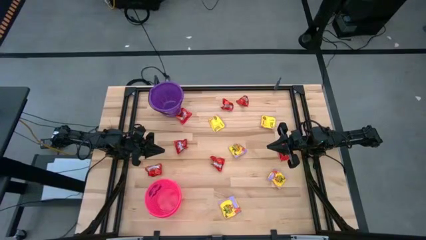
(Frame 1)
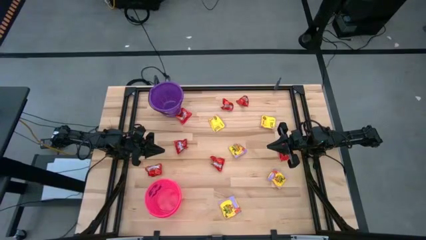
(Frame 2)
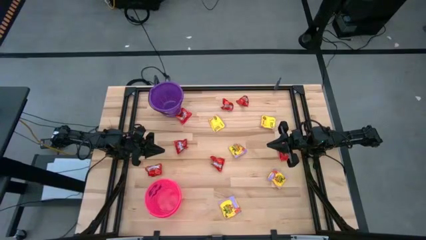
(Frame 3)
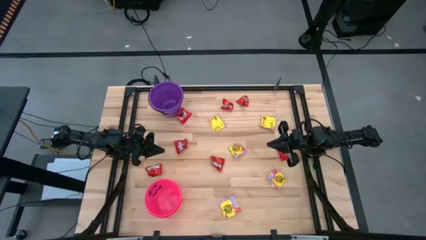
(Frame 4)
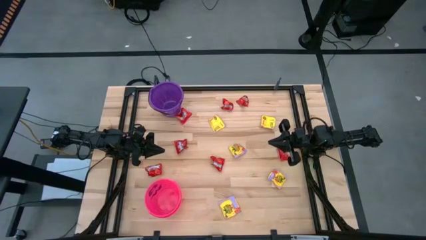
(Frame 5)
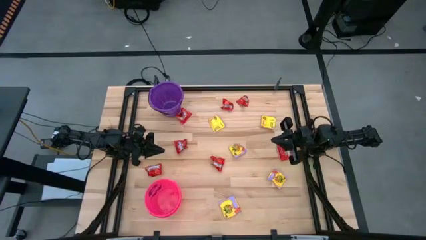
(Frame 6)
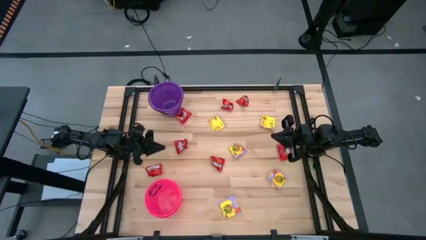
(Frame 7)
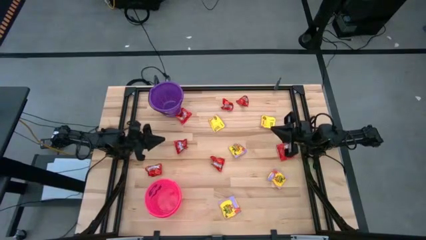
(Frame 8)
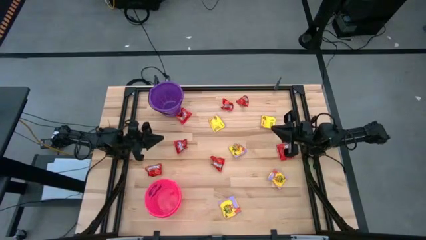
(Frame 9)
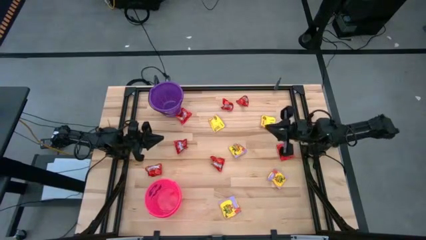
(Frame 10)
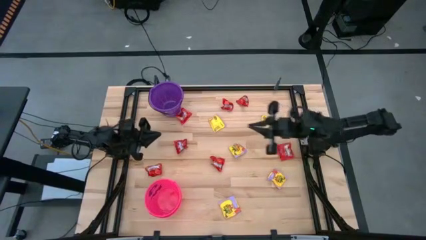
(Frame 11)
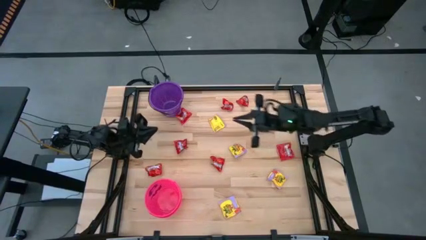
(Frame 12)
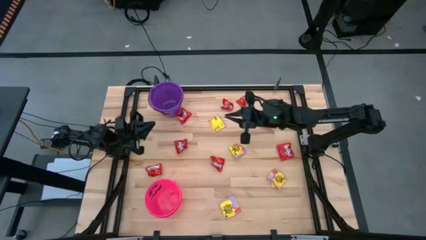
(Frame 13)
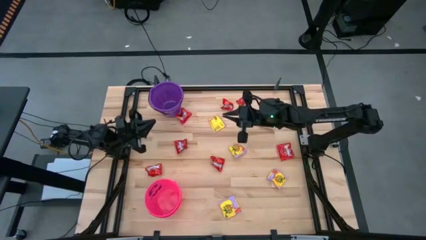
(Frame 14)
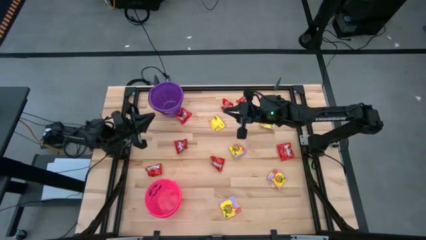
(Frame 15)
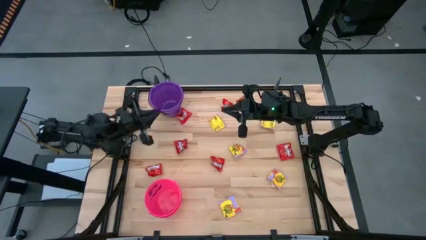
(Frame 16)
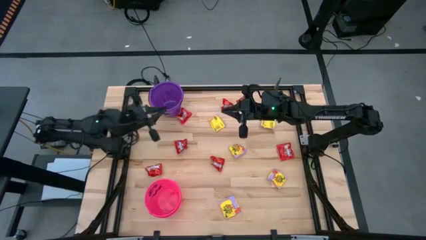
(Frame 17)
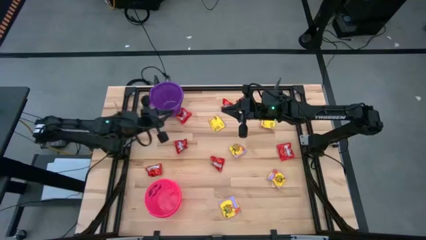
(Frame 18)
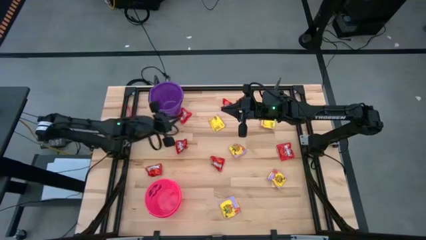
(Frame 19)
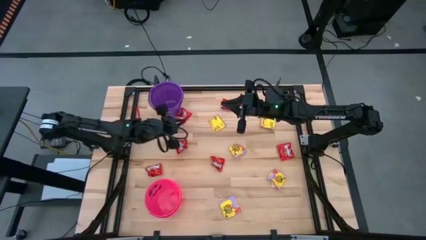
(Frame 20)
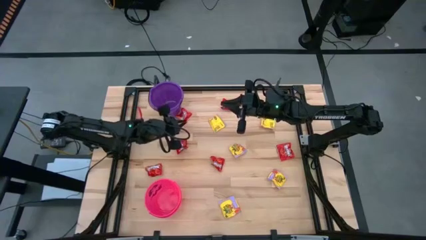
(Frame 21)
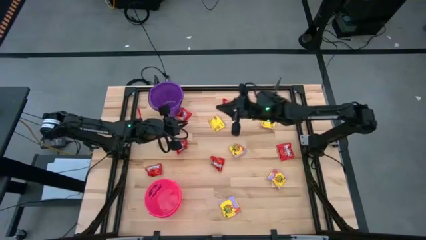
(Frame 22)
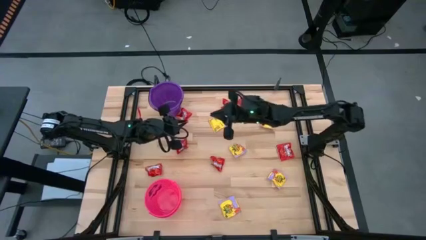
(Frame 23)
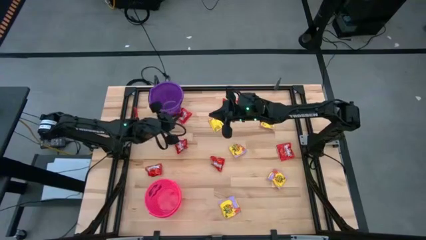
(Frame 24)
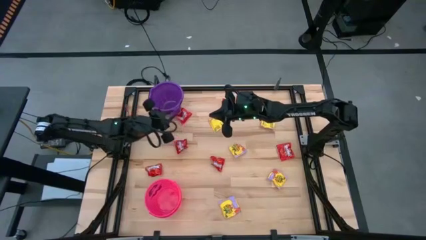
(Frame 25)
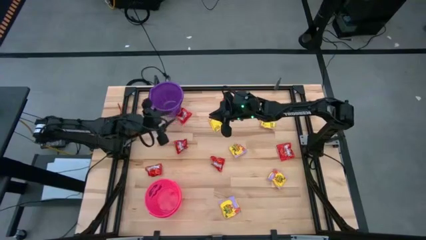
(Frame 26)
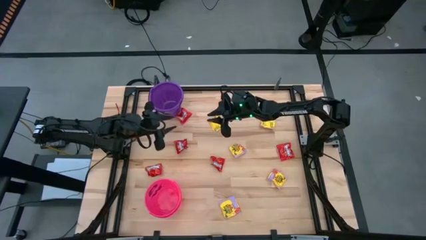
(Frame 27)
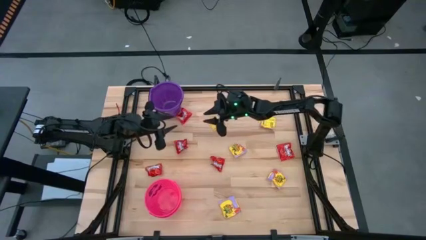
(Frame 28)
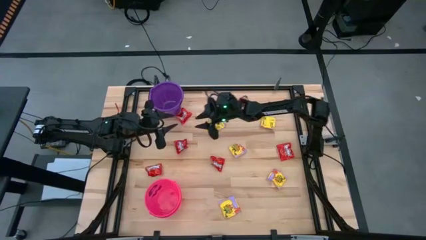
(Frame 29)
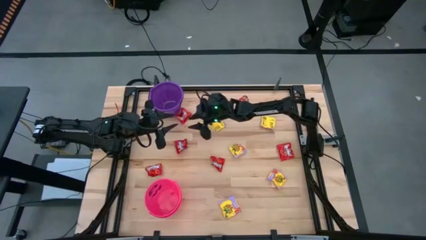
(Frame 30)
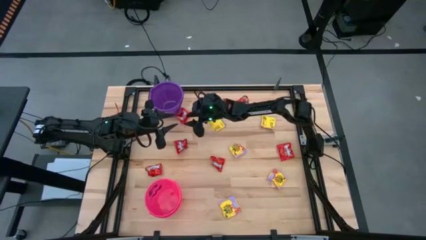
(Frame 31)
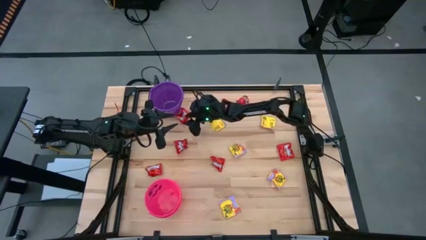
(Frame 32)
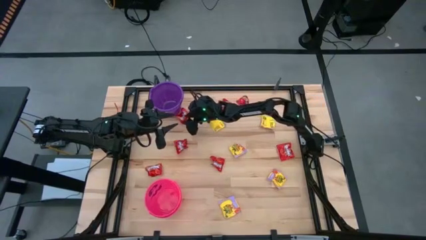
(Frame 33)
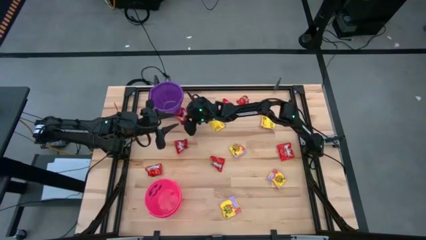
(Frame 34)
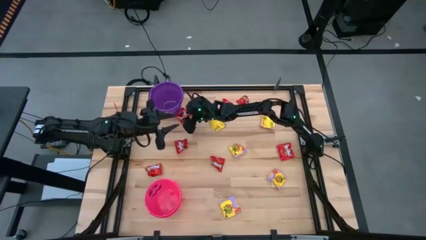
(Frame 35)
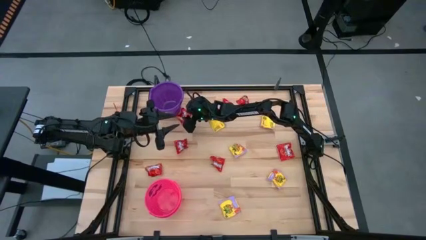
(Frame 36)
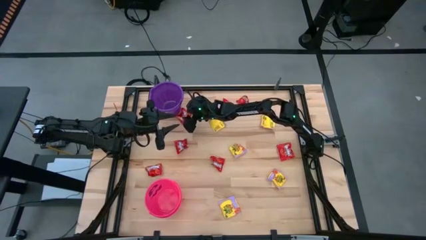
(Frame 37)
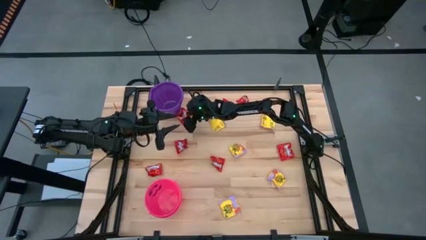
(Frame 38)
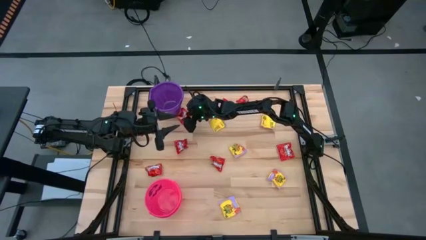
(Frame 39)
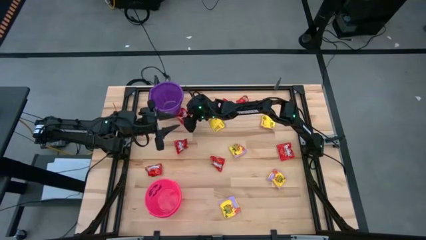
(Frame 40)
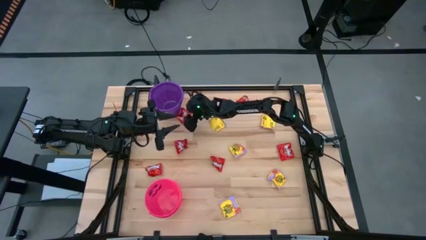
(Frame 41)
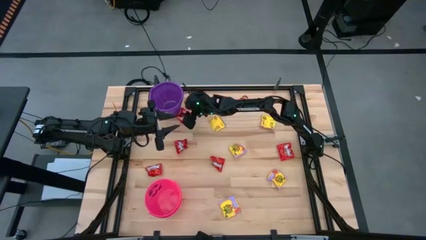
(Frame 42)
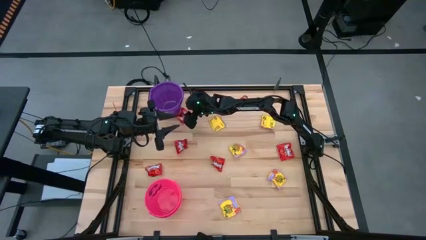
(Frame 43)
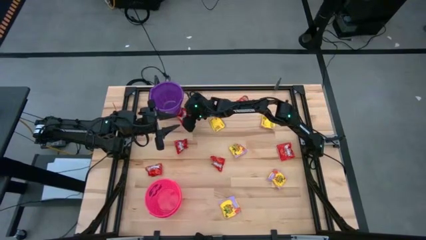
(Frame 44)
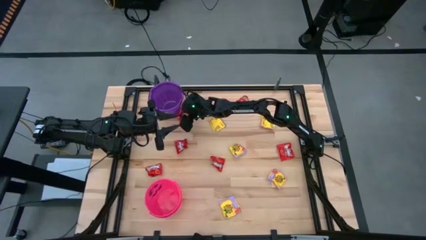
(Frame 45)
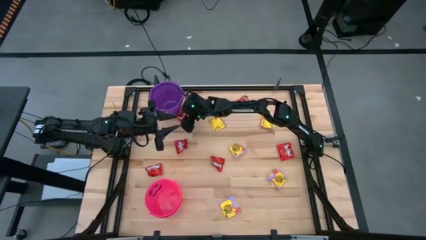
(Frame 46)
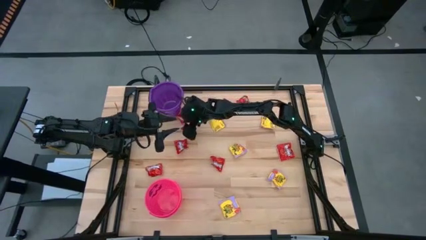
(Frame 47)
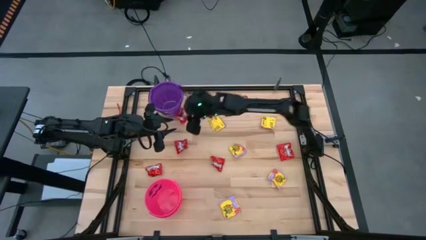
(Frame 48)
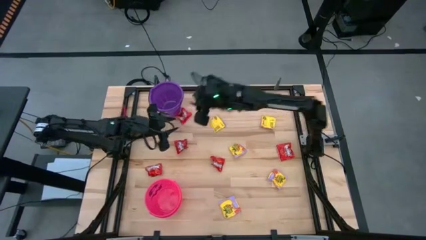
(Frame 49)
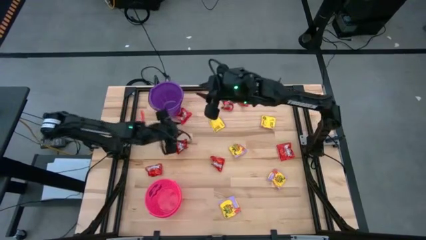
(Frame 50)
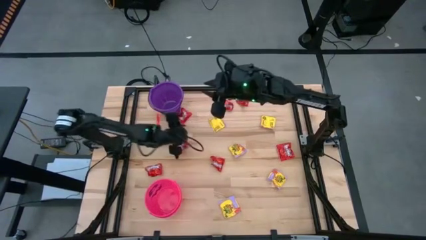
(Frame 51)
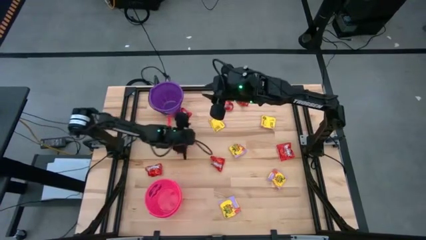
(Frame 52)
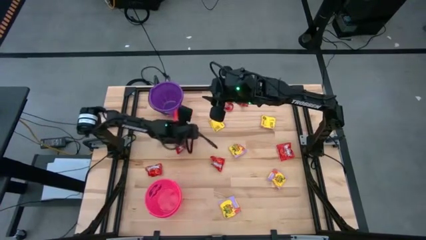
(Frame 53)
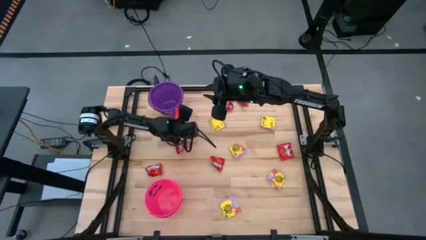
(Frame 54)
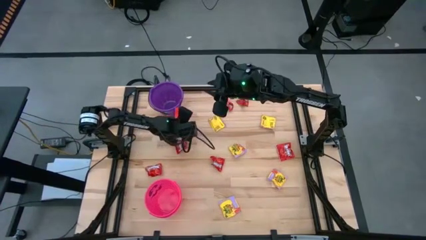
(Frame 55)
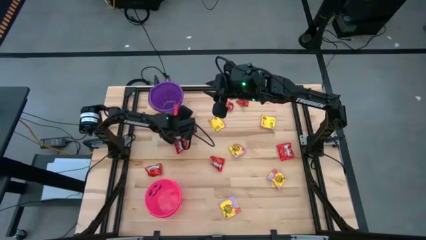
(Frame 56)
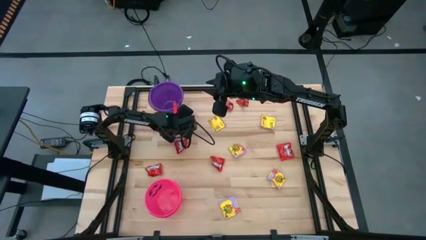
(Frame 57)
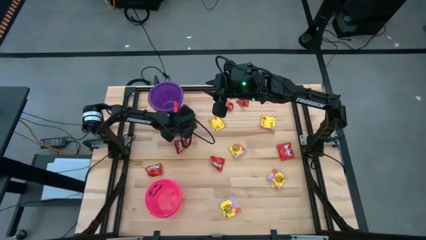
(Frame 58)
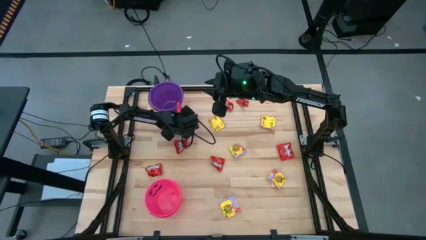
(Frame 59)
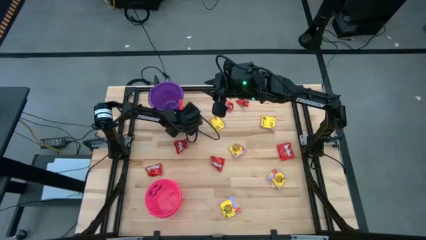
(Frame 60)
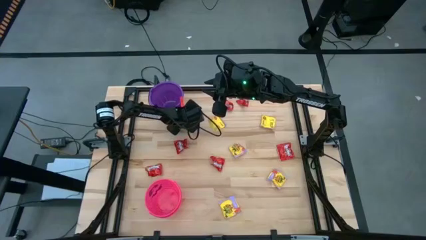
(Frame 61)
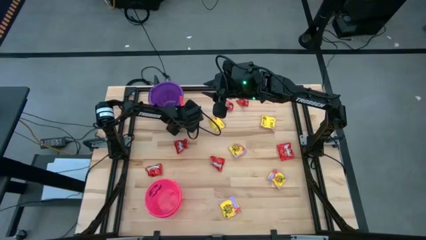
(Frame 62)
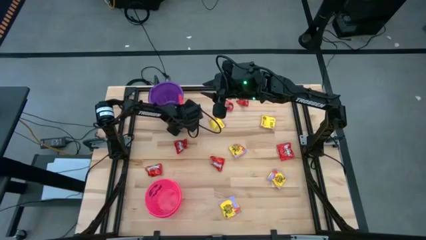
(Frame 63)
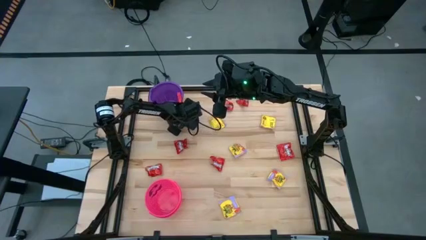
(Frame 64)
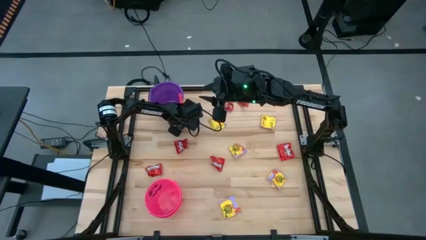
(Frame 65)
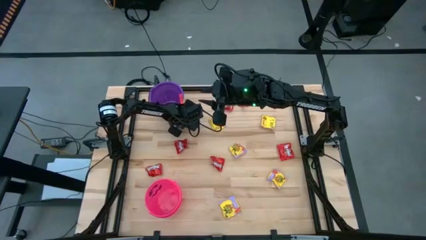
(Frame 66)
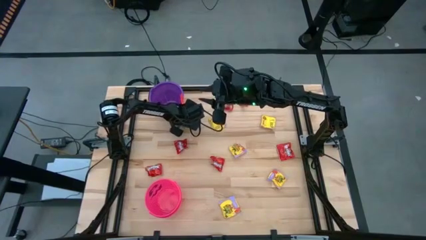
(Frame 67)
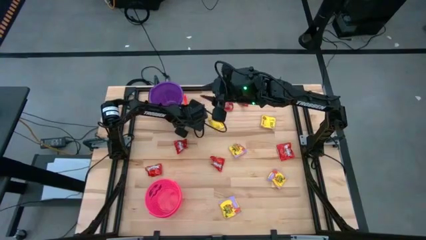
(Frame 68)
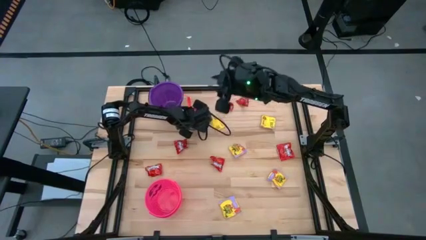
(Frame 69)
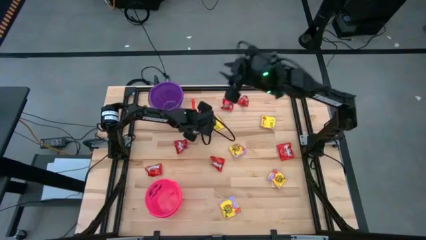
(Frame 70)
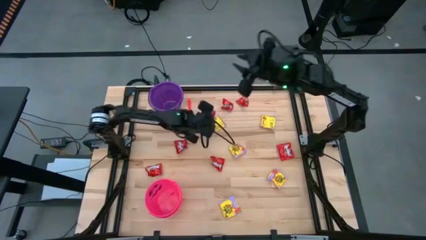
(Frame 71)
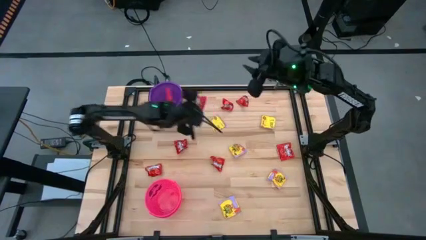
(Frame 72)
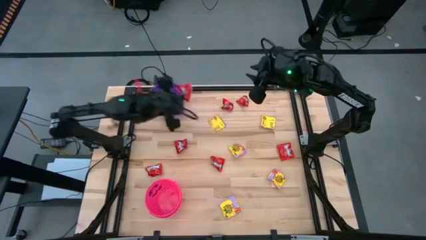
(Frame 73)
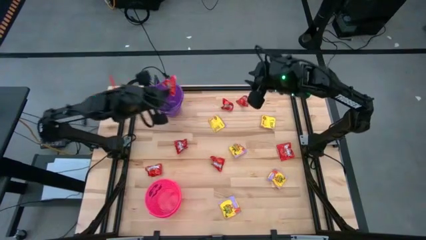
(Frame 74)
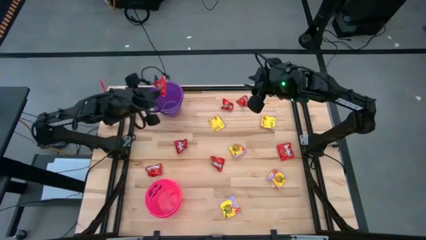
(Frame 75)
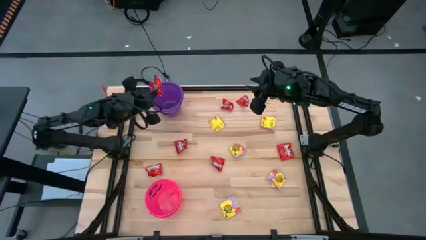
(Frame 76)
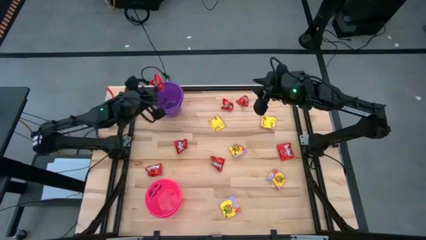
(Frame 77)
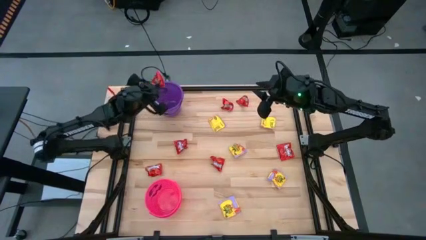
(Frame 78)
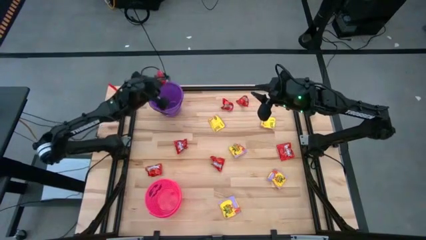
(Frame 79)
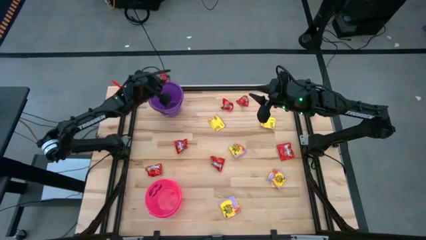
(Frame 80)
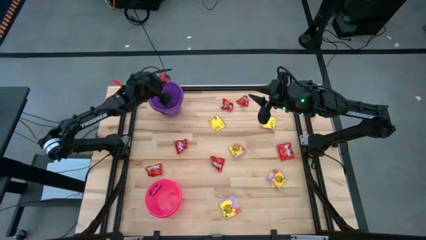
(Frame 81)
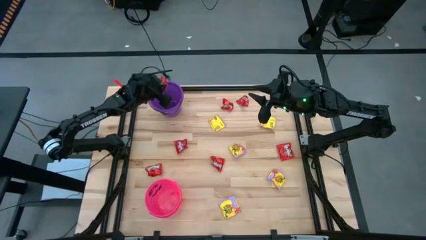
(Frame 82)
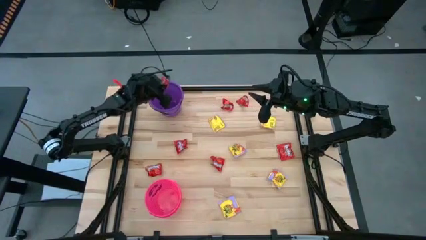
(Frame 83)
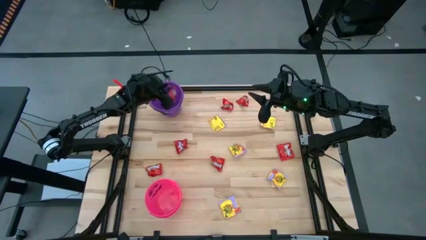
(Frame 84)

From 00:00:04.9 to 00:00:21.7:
Task: Sort candy by brand, put in halloween buckets
Put the red candy into the purple bucket
